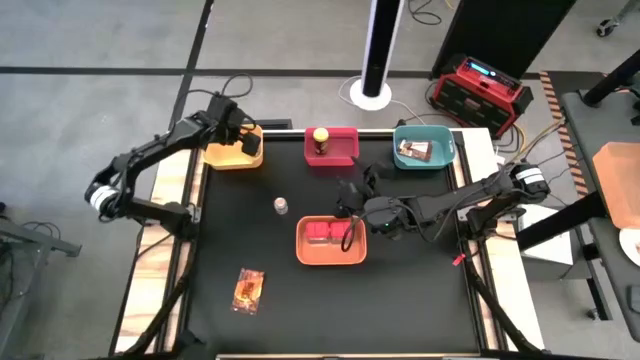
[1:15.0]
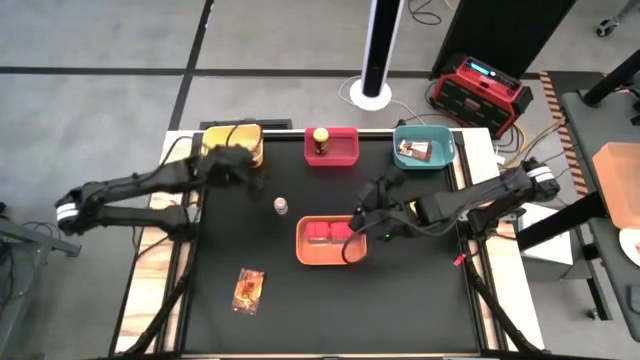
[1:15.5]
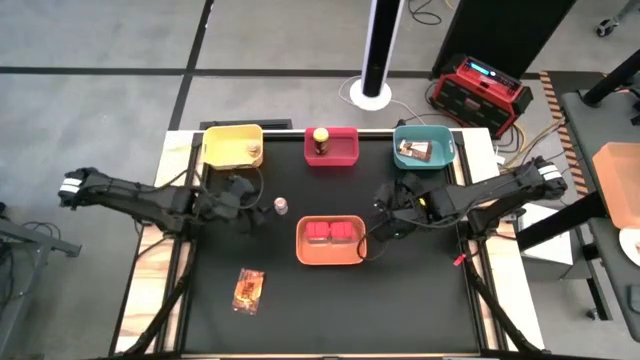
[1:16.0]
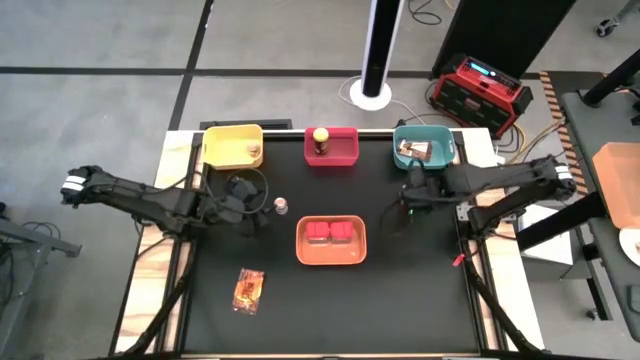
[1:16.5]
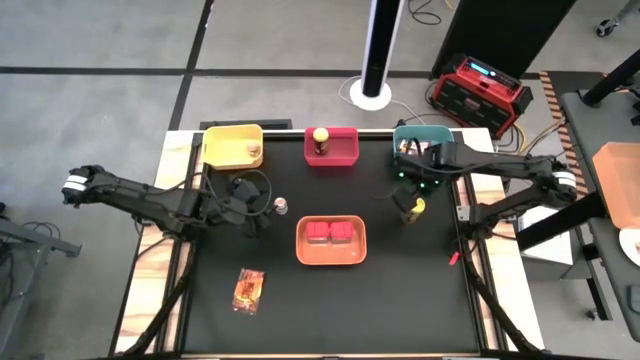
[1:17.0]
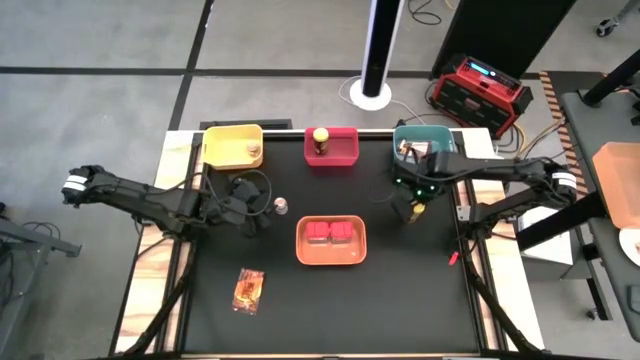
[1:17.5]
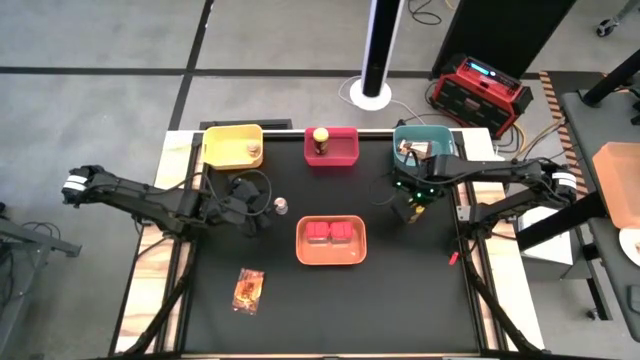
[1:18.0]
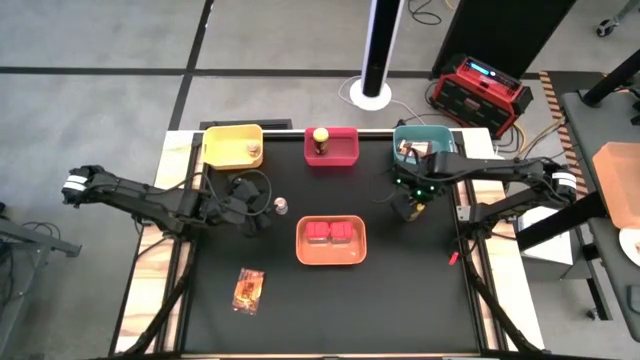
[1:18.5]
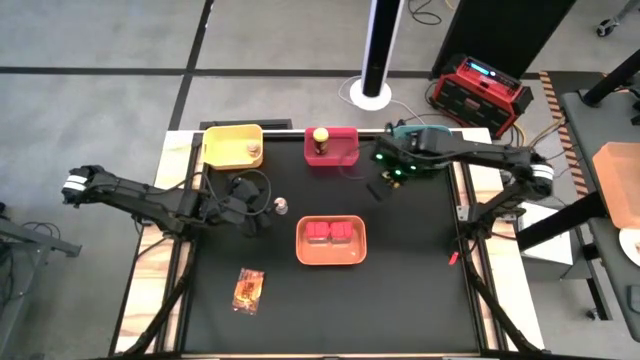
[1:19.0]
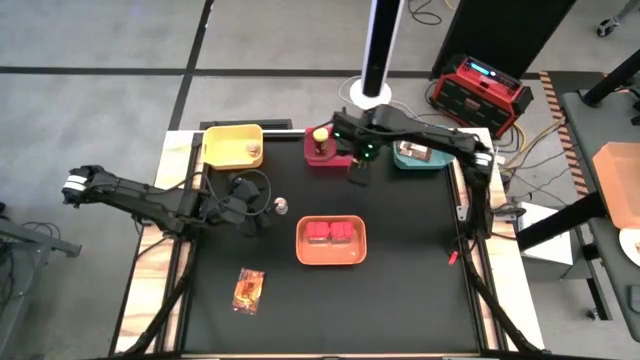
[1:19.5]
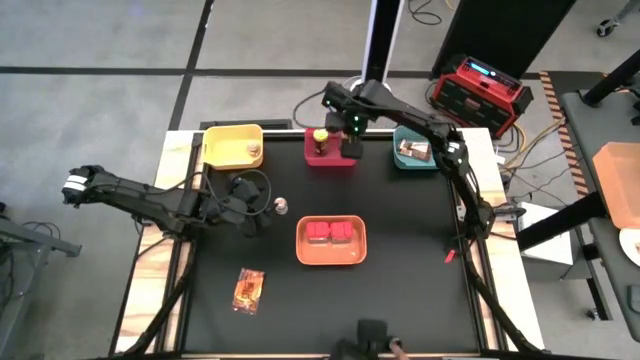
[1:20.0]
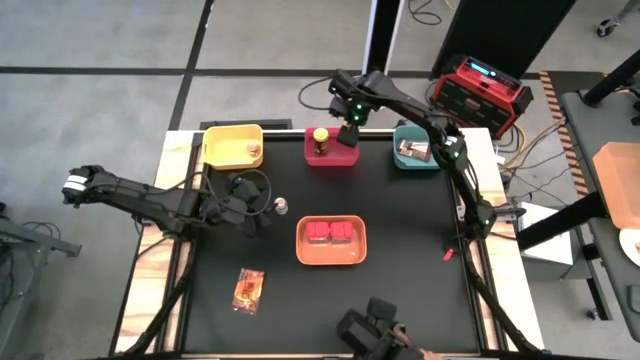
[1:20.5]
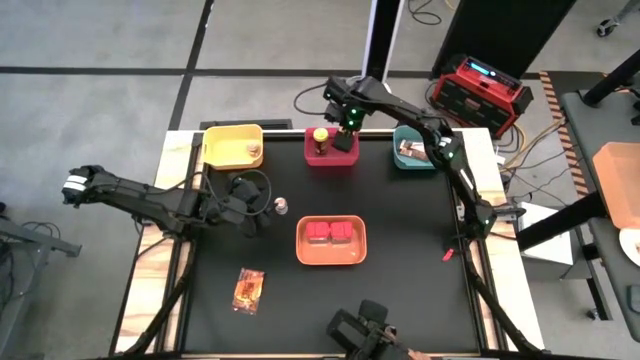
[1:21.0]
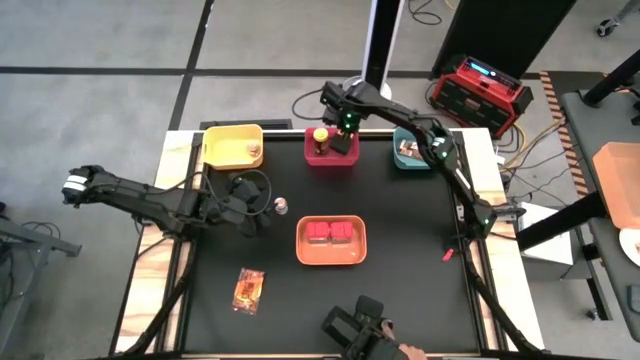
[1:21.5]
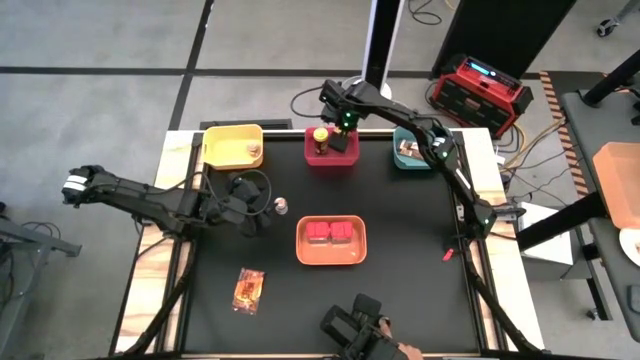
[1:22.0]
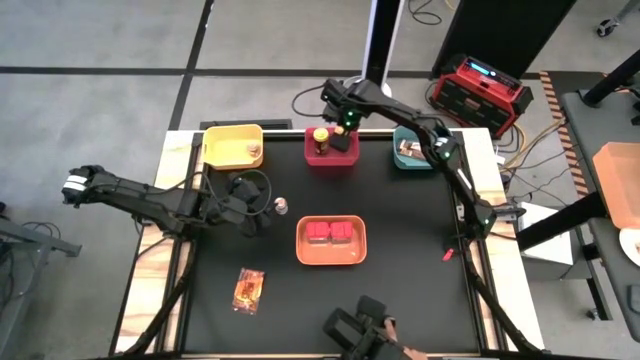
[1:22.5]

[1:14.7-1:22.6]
Task: Sort spices by type
Put the yellow seasoning bottle into the red bin

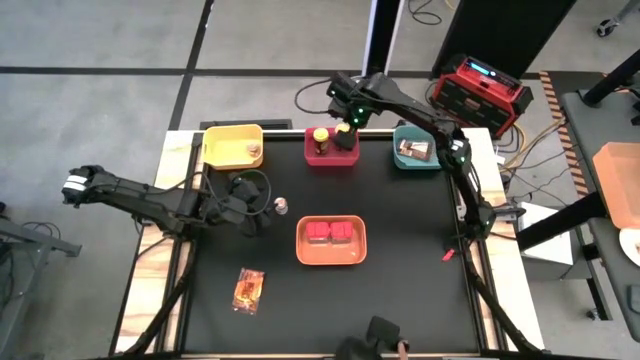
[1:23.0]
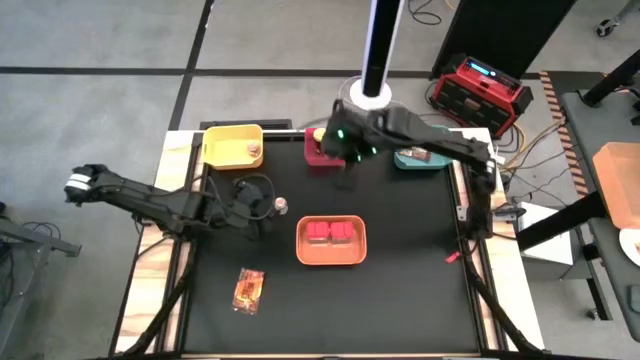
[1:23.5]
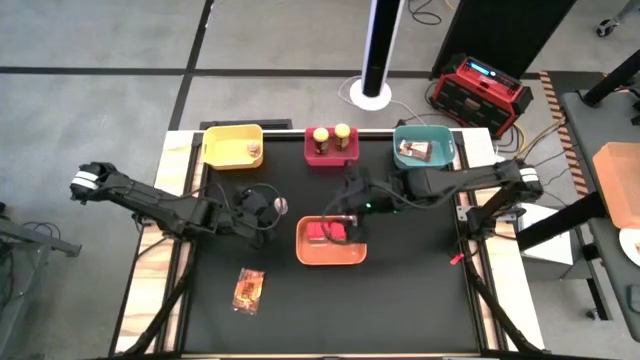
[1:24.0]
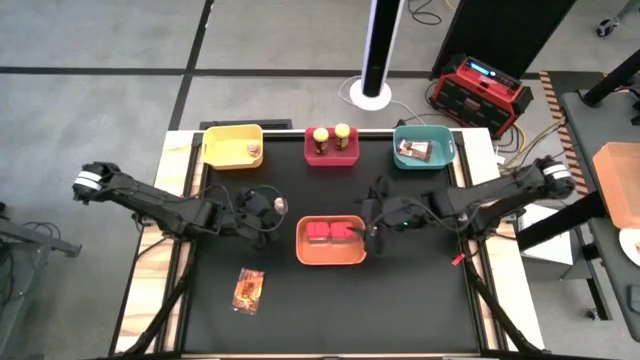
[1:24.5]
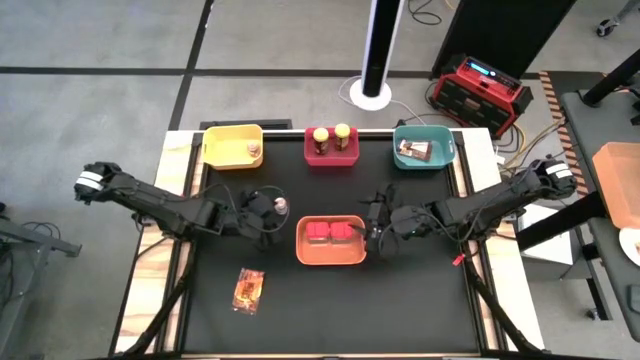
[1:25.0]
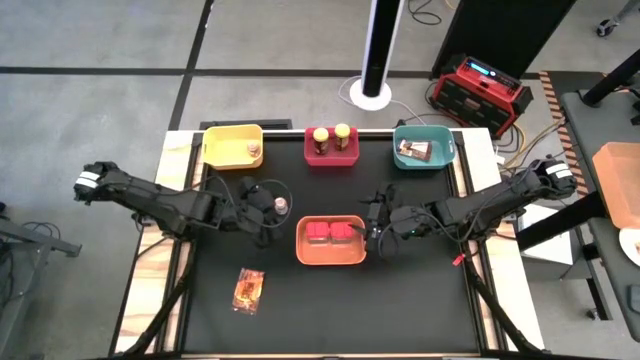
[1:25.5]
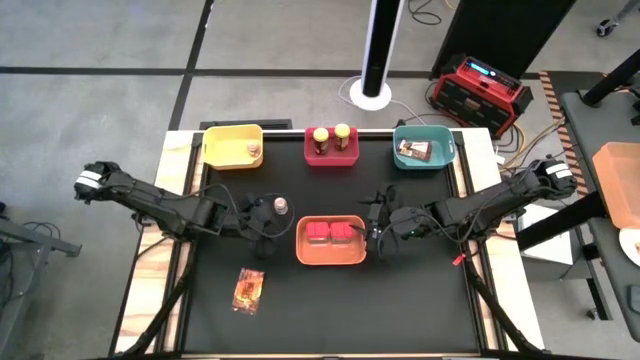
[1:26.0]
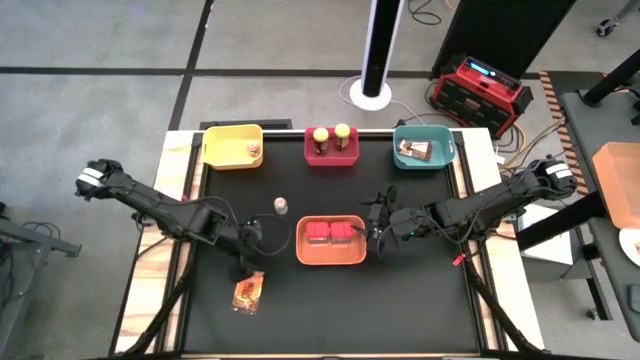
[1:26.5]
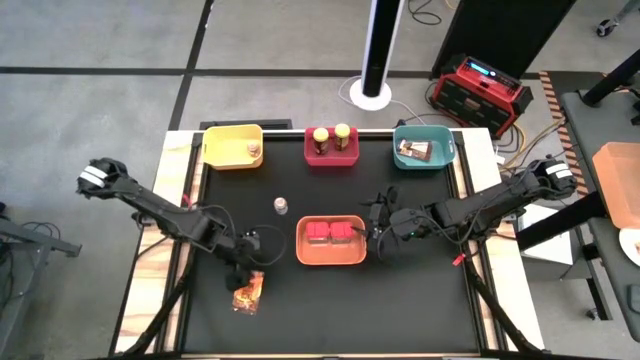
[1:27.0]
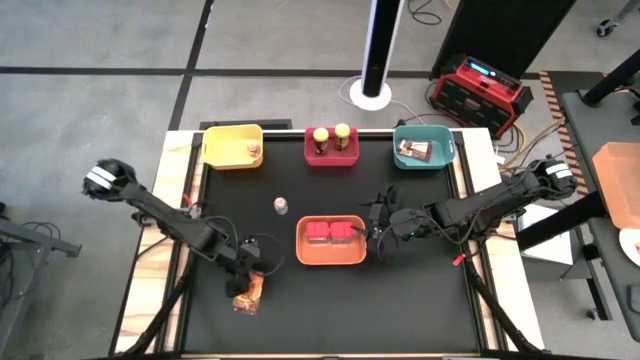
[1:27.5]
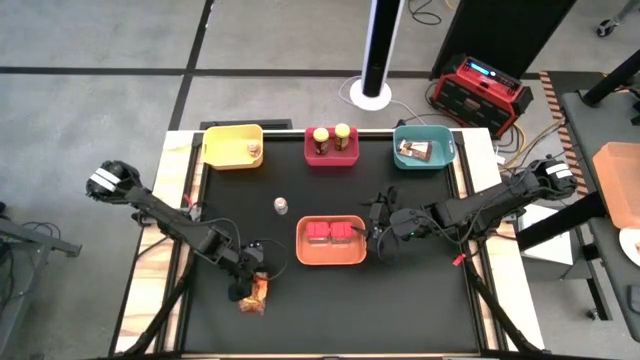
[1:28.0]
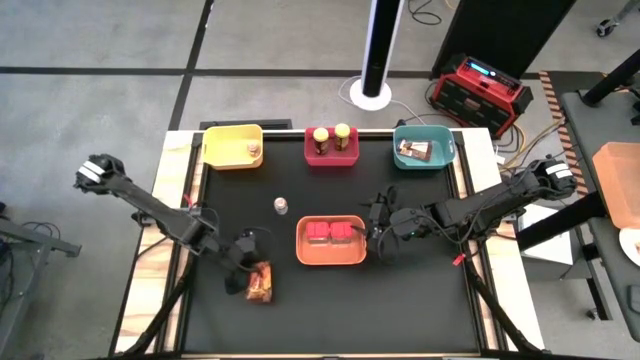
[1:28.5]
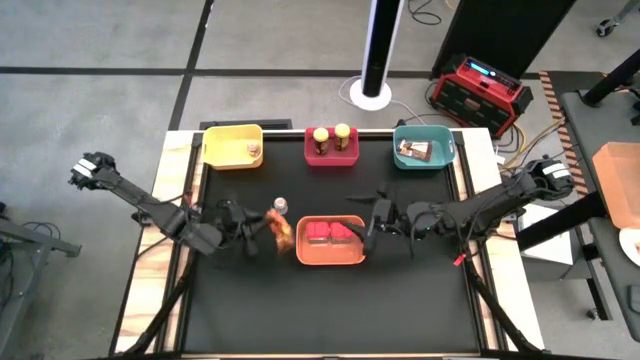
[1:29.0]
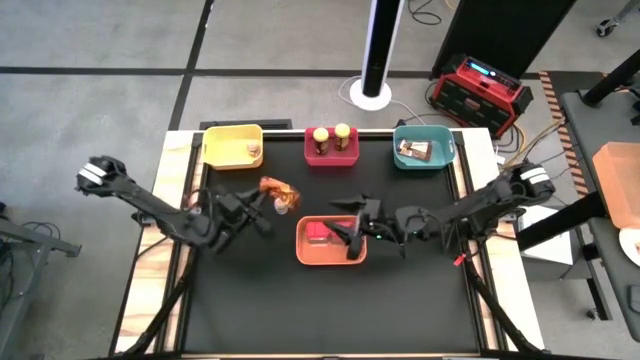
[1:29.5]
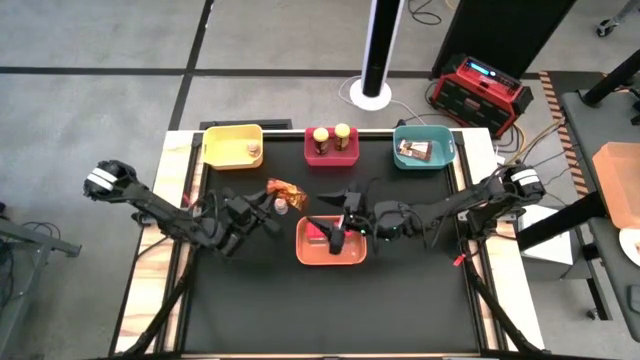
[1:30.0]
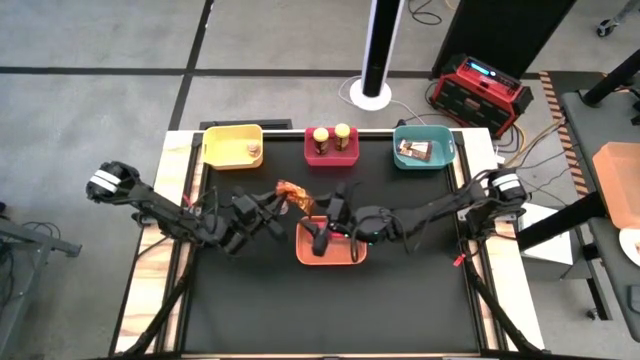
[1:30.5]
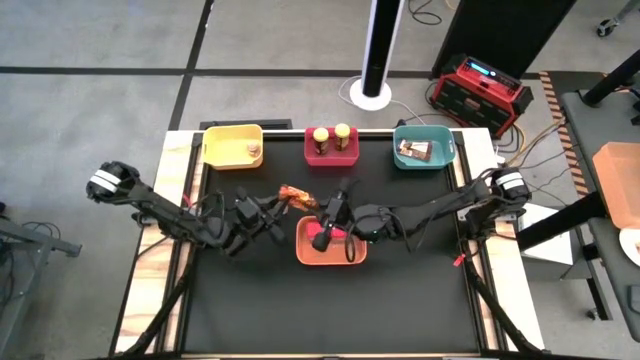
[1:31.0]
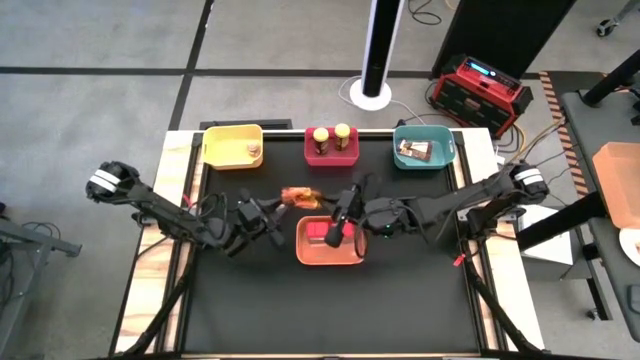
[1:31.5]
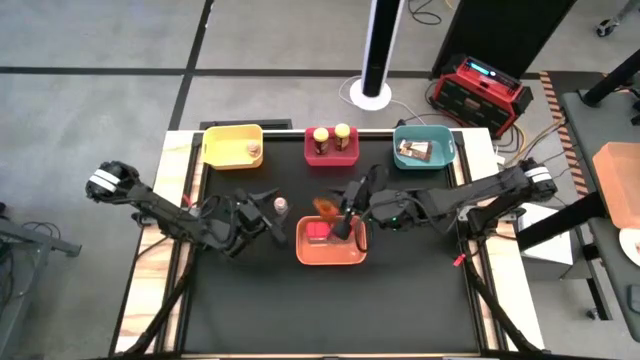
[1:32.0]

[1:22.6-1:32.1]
Put the brown seasoning bag into the green bin

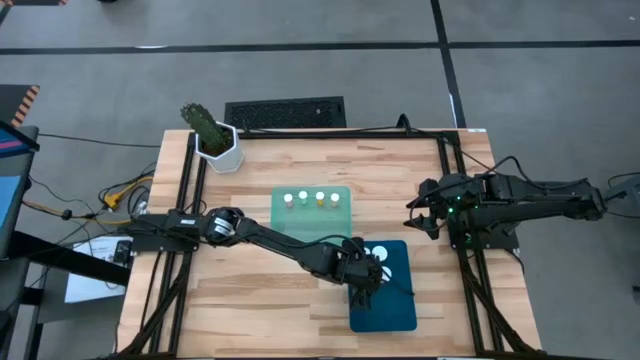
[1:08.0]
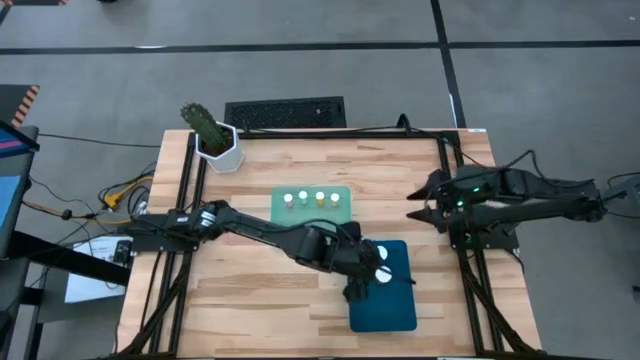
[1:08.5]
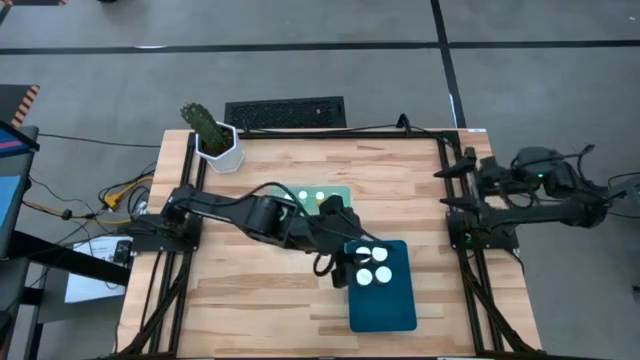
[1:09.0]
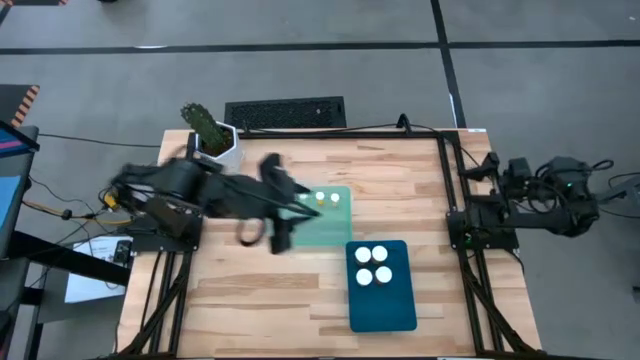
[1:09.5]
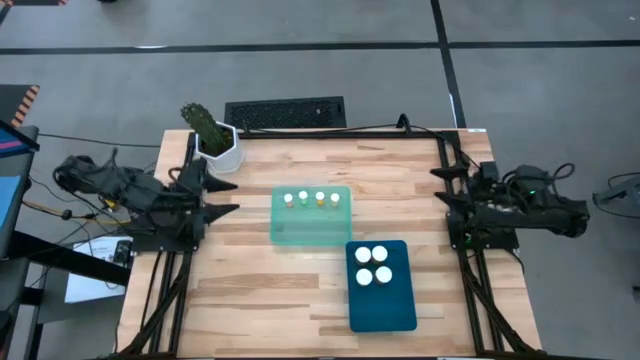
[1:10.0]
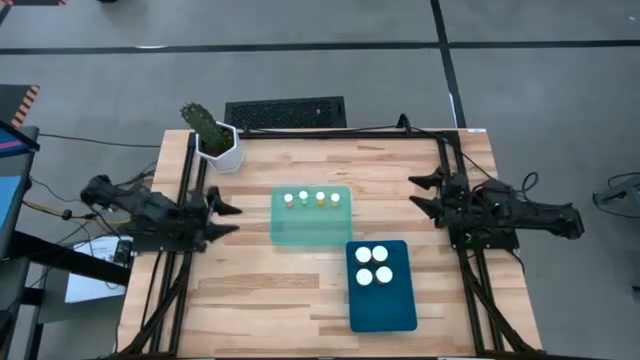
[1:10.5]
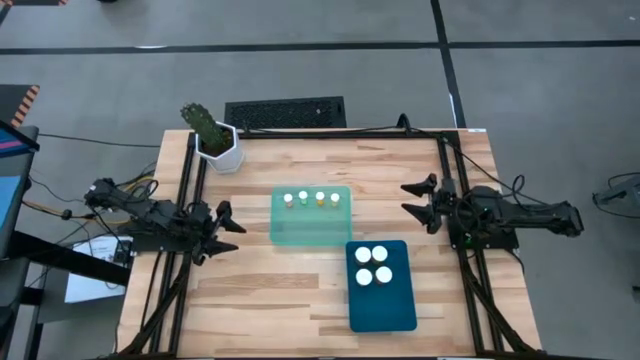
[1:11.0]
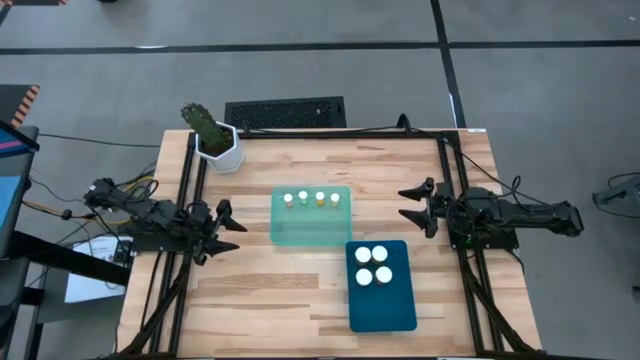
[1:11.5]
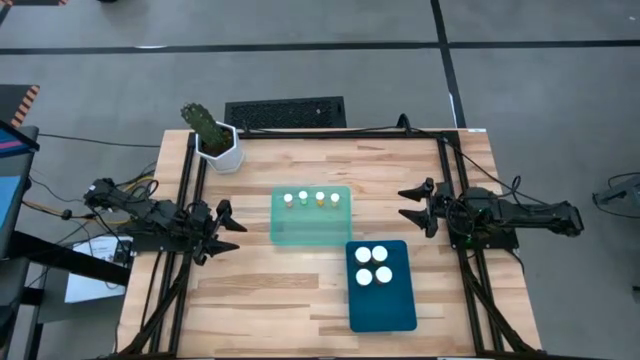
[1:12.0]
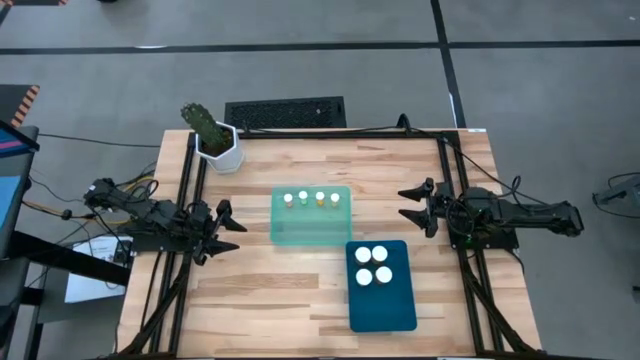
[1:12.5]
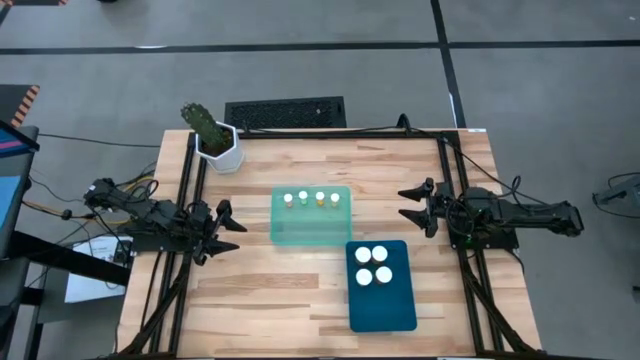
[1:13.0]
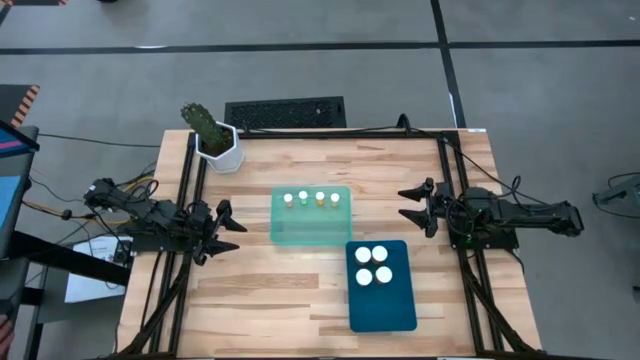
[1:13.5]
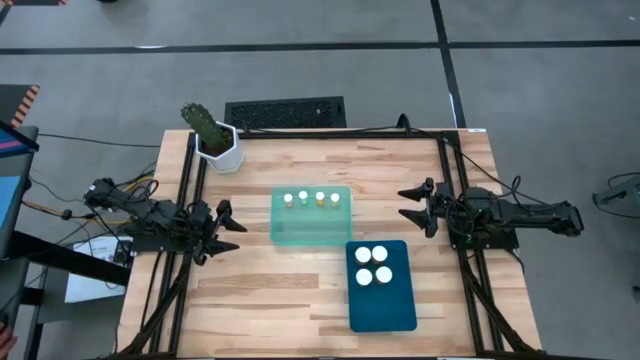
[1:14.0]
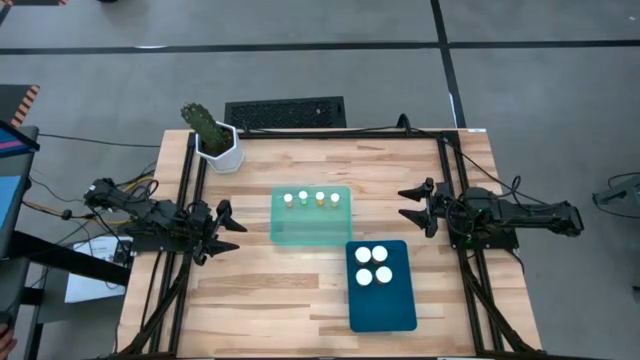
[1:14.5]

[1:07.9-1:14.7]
Task: Pick and place medicine bottles into bin by pill shape (circle, oval)
Return to Home Position
